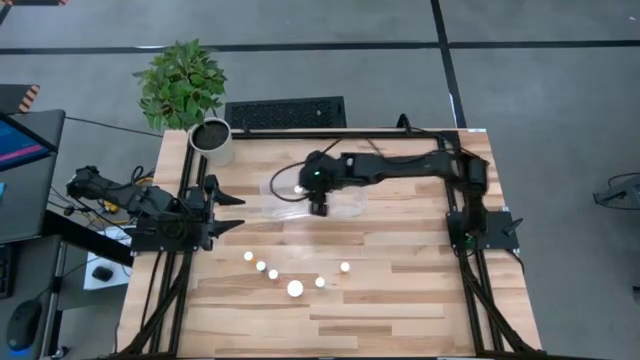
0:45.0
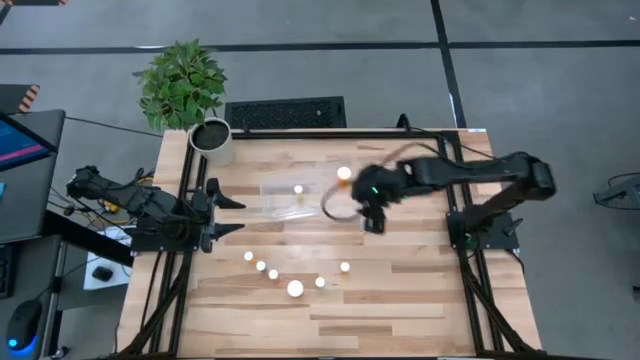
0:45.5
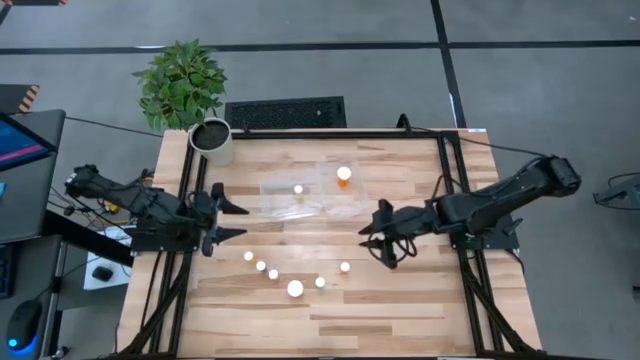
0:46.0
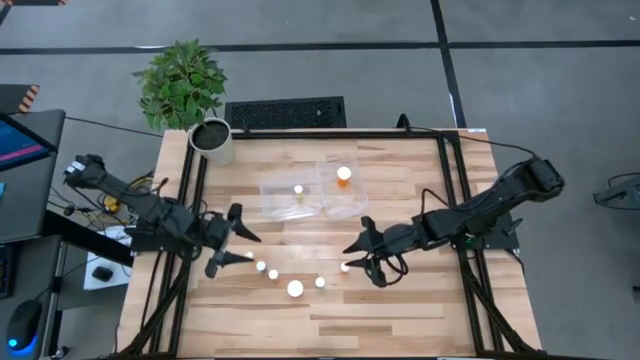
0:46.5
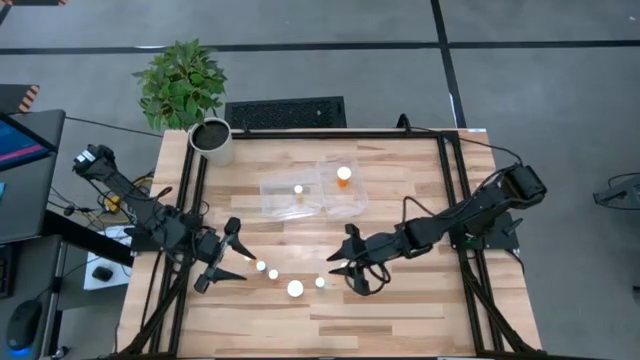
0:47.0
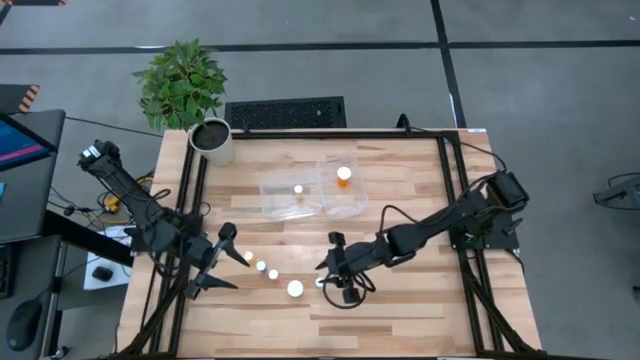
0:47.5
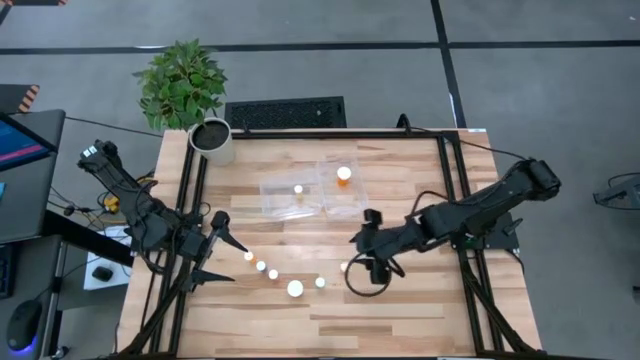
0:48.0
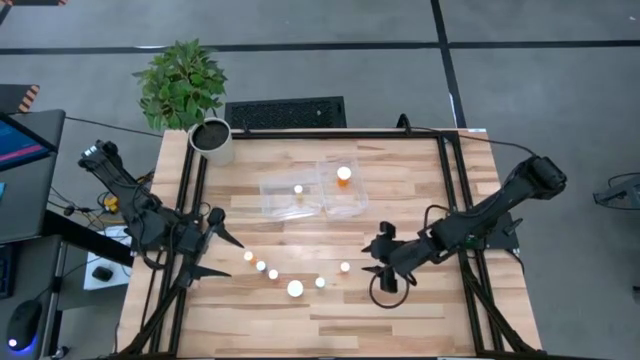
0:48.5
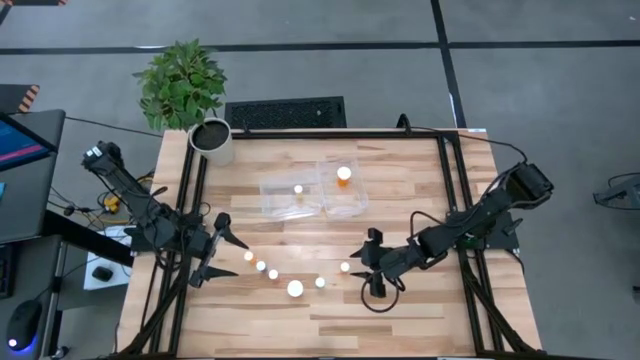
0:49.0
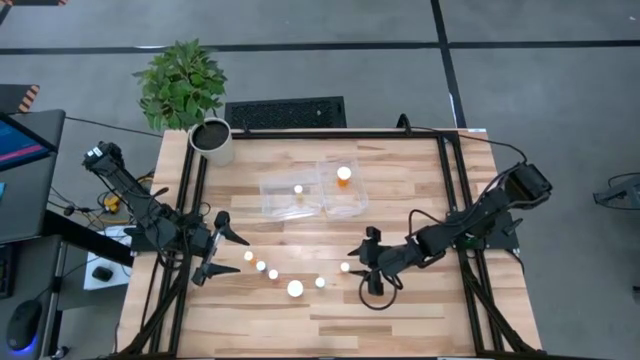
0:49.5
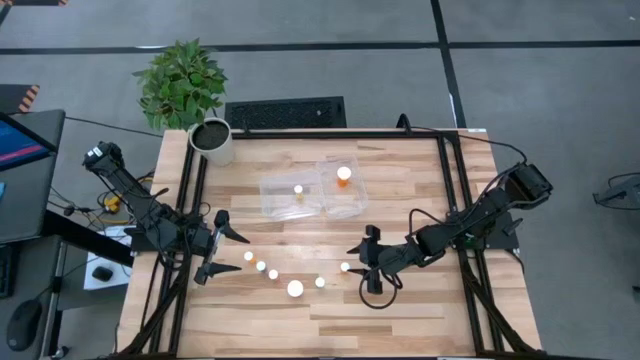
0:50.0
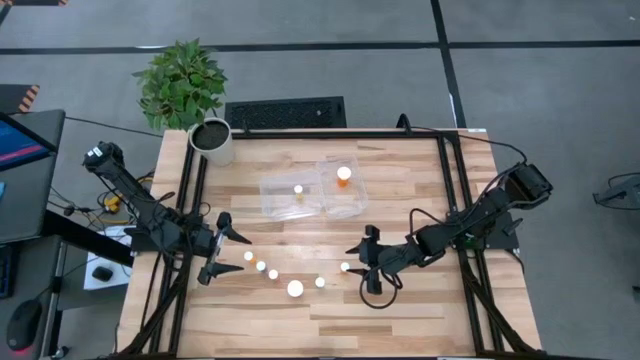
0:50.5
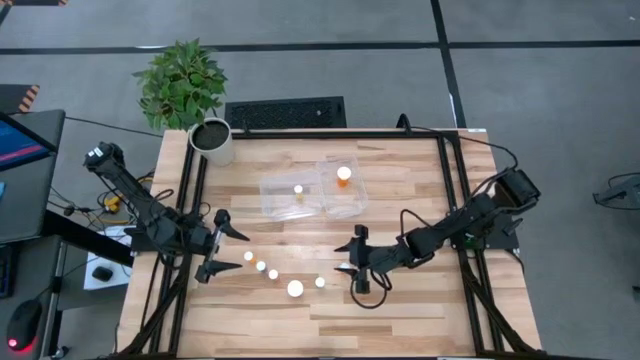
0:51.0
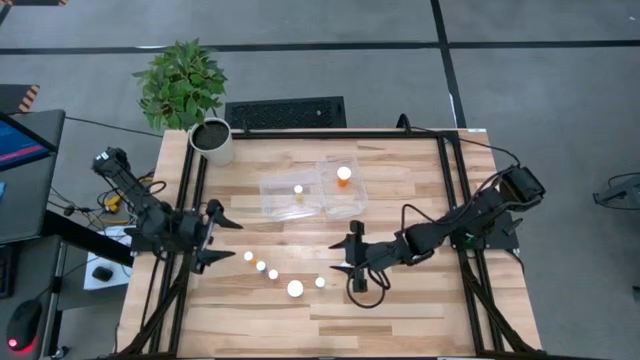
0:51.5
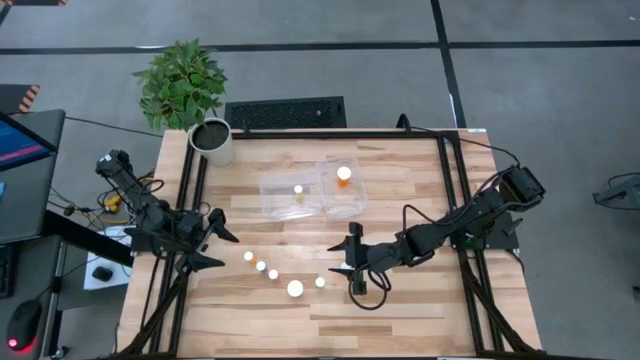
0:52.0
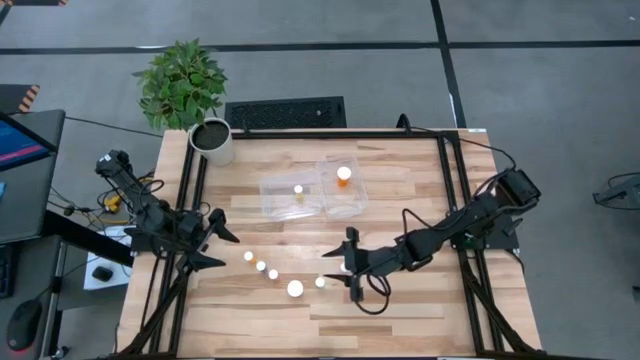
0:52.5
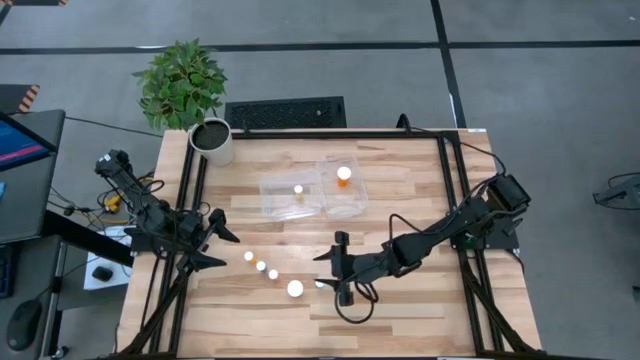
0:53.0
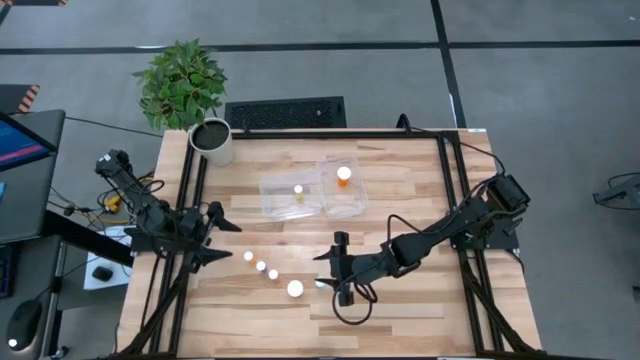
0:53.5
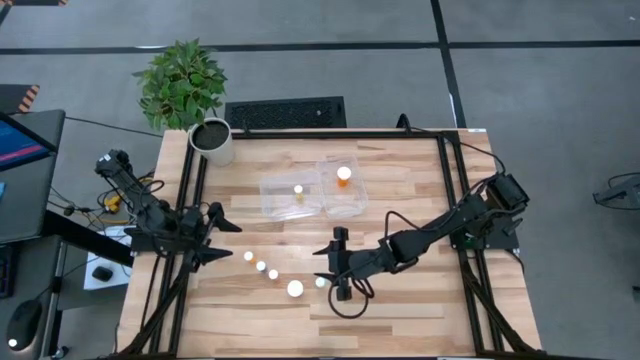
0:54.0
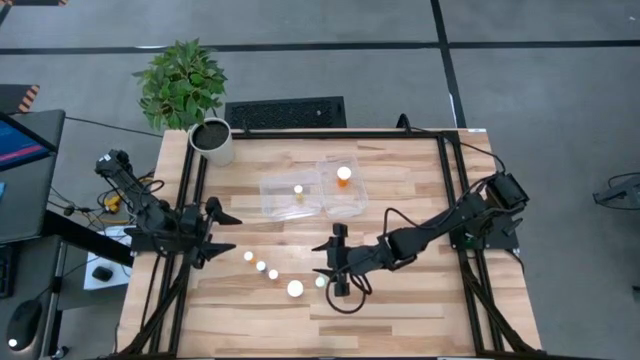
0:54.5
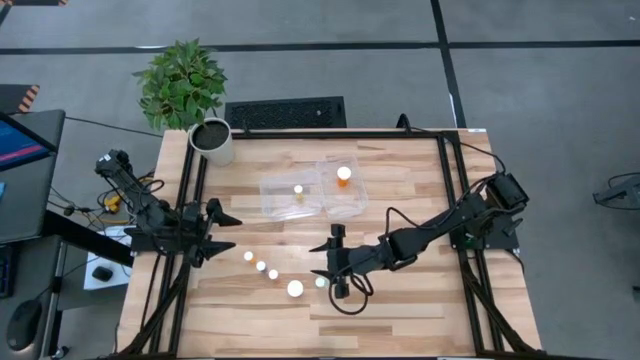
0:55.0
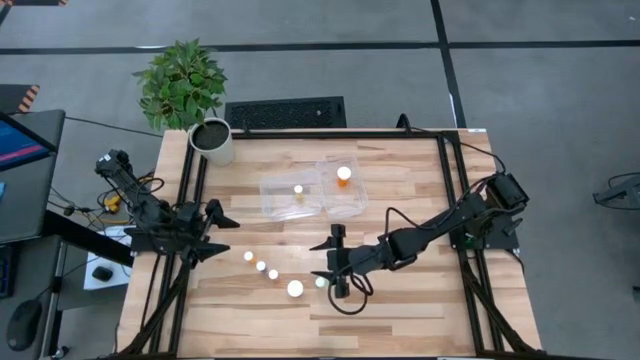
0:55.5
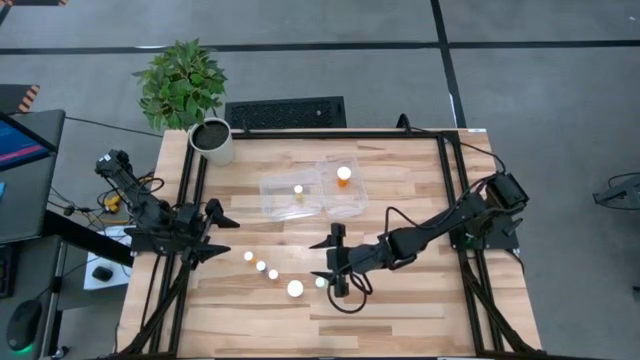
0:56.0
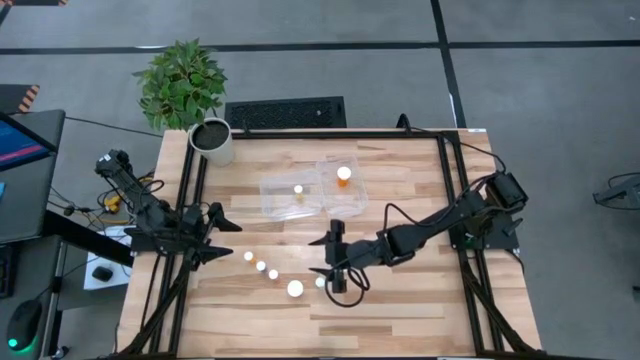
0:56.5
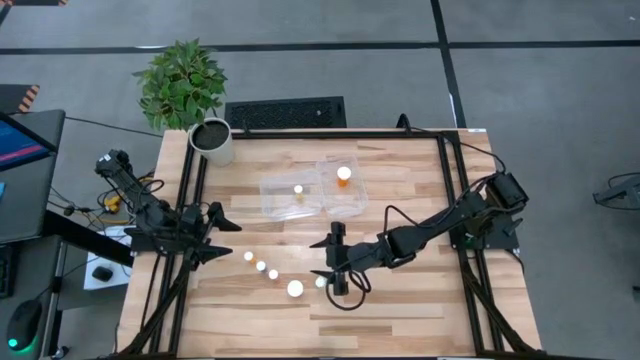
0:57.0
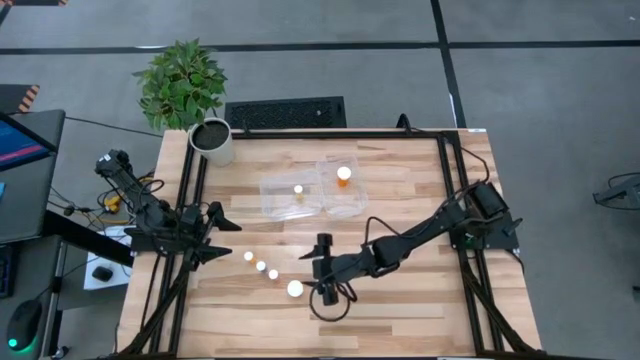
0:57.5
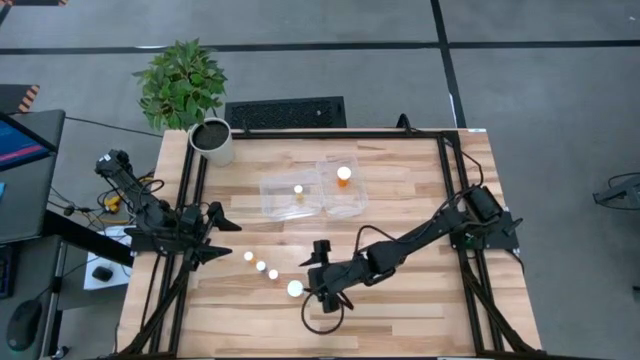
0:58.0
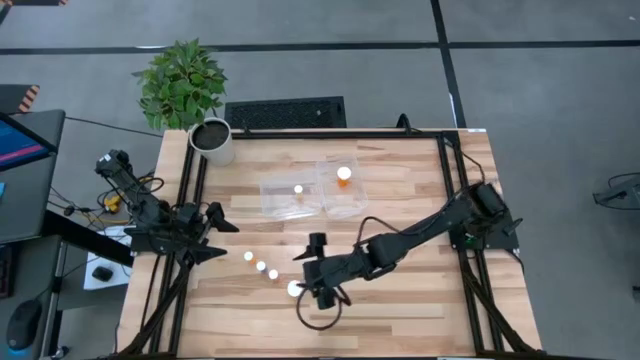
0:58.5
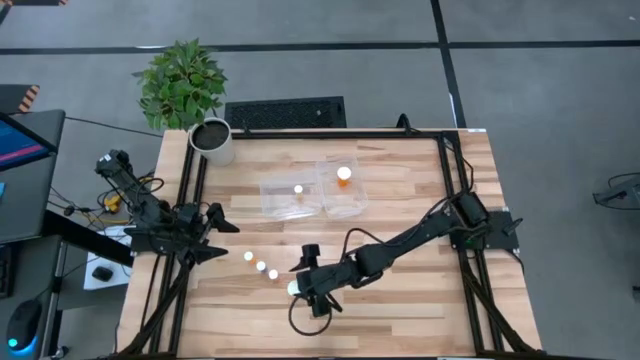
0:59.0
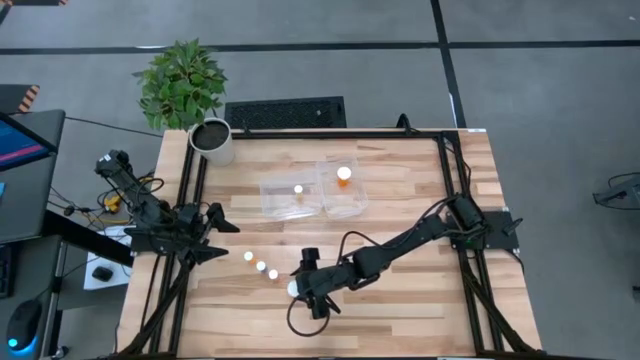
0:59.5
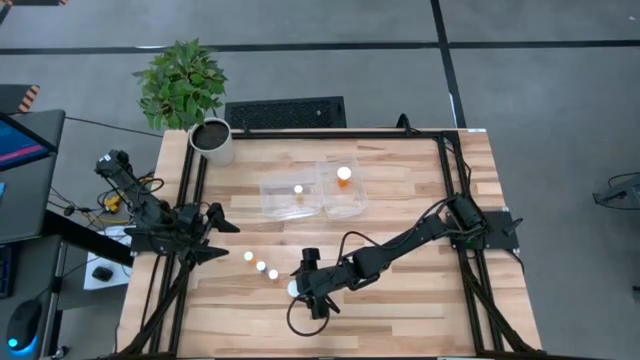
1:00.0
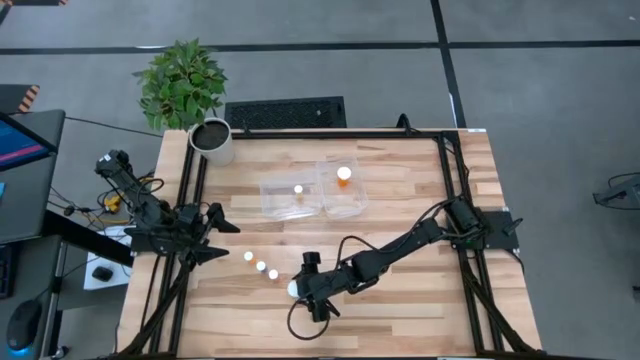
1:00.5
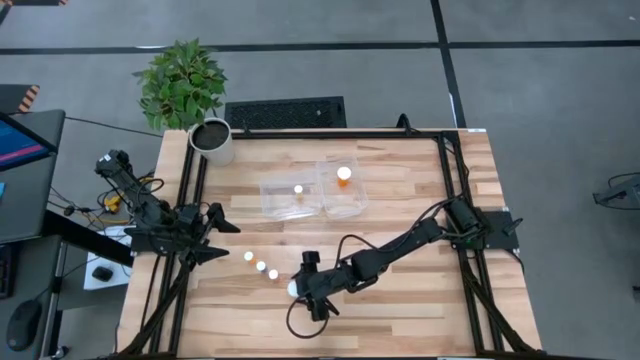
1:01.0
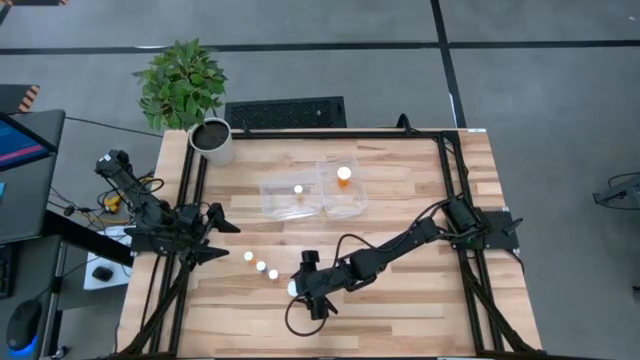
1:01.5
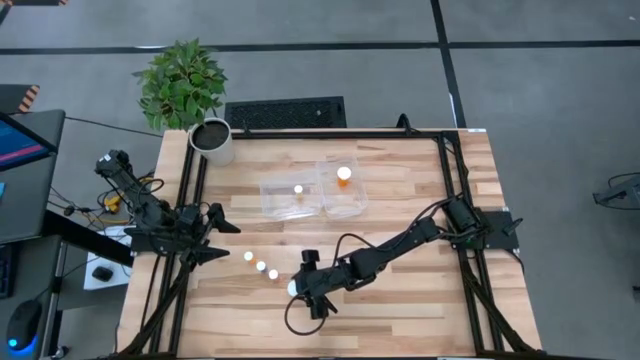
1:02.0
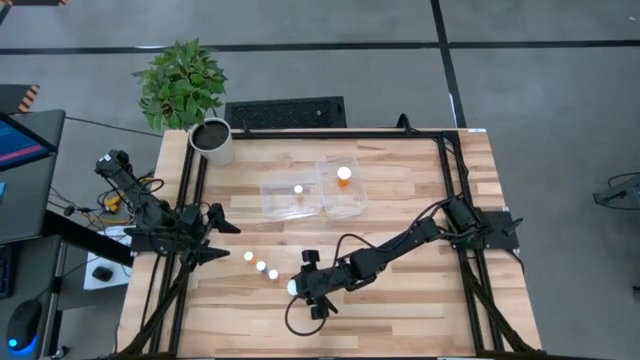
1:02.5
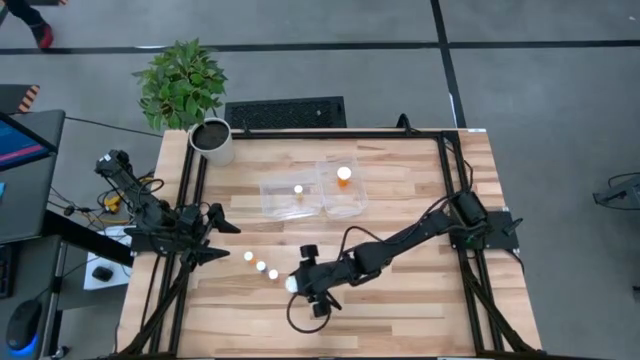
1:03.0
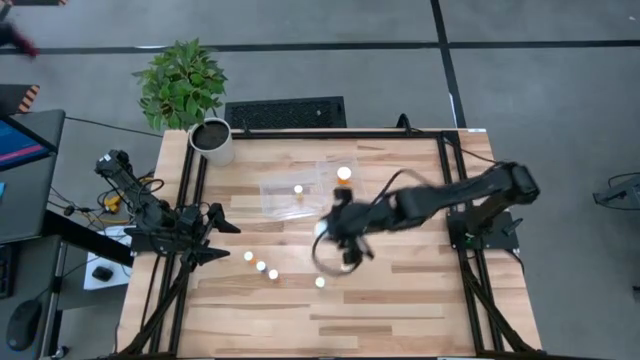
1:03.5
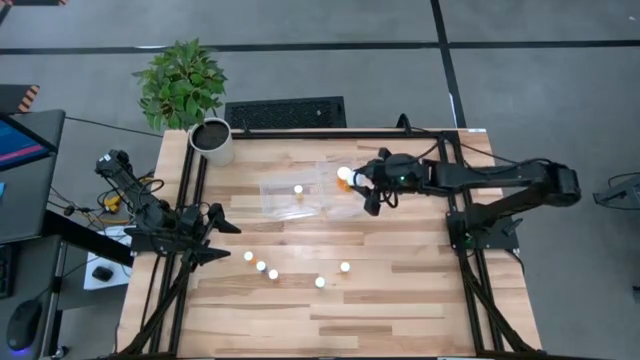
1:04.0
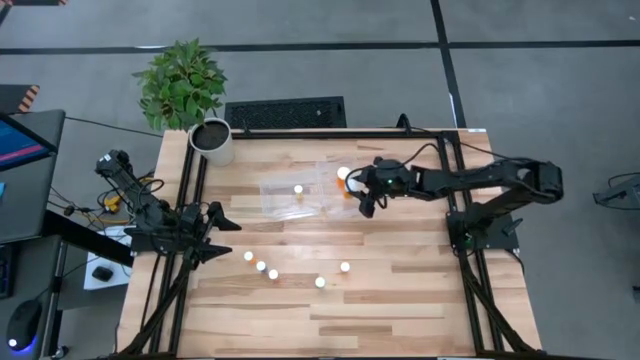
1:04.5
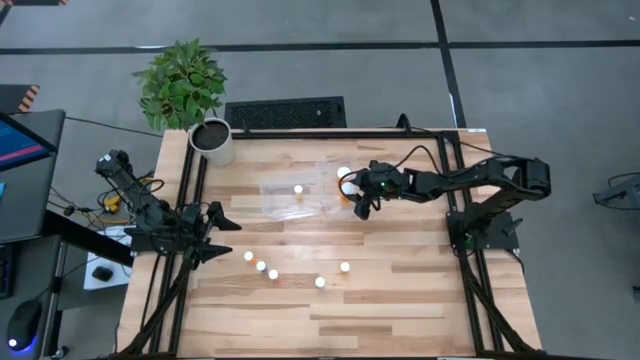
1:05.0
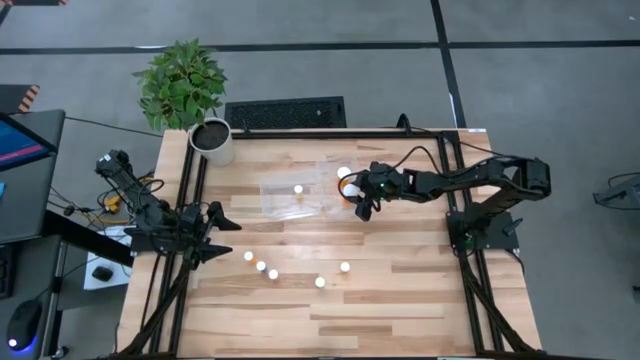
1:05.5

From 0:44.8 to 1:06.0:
Task: Pick and place medicine bottles into bin by pill shape (circle, oval)
Put the orange capsule bottle into the right transparent bin
